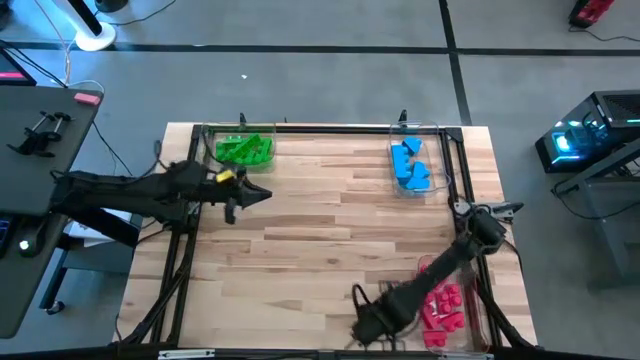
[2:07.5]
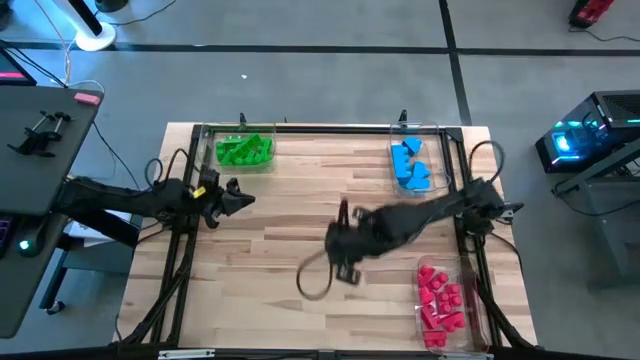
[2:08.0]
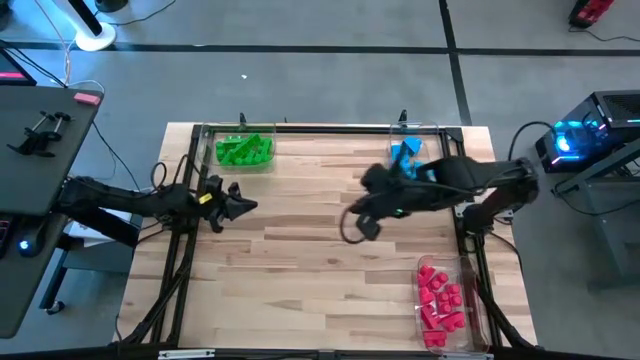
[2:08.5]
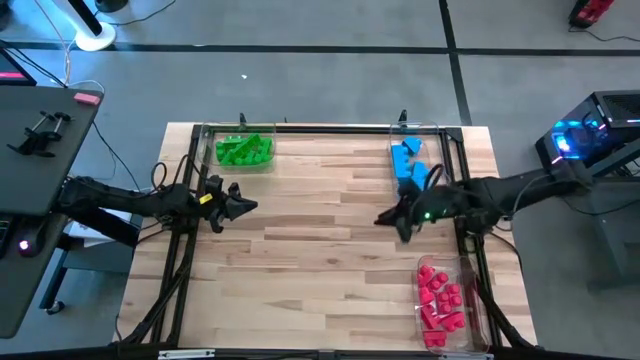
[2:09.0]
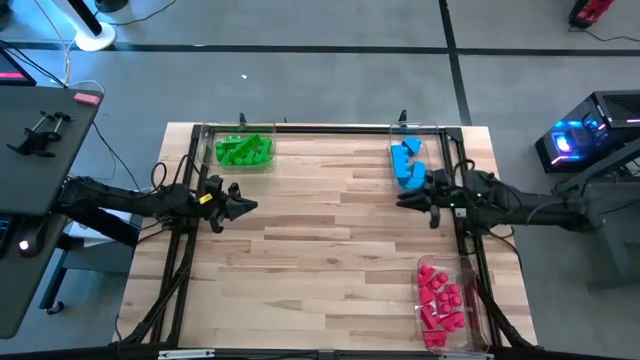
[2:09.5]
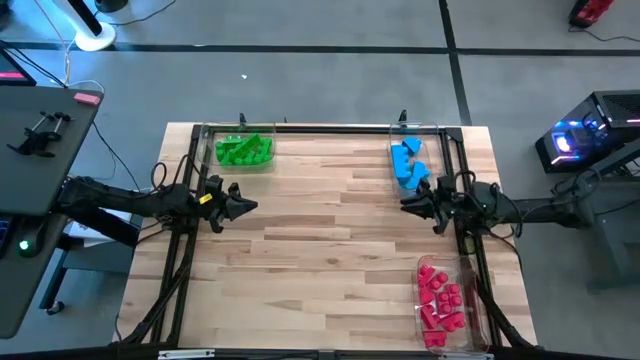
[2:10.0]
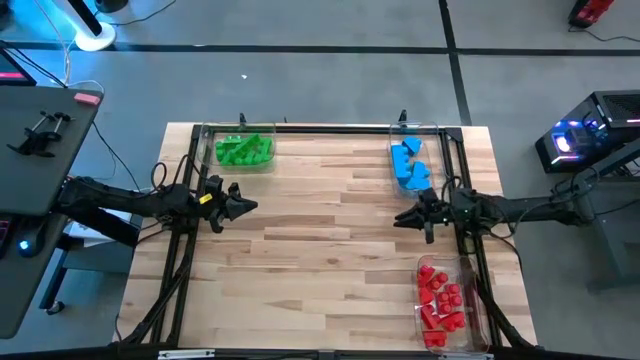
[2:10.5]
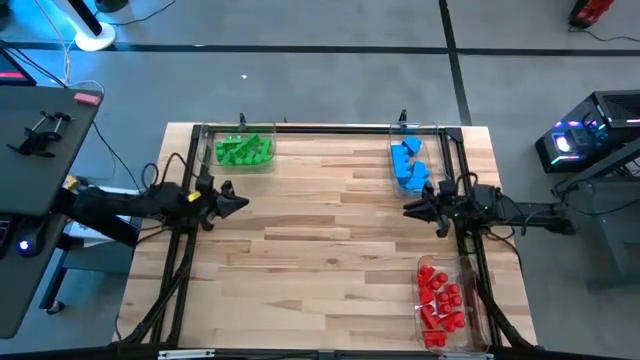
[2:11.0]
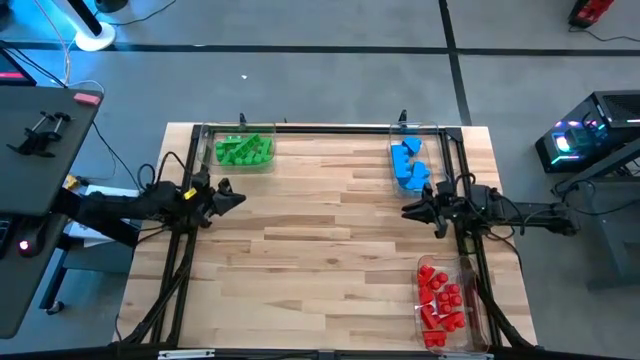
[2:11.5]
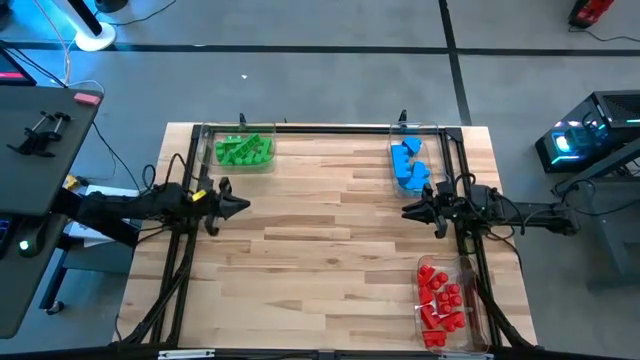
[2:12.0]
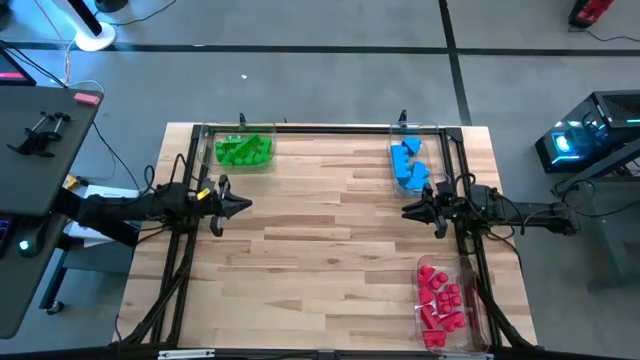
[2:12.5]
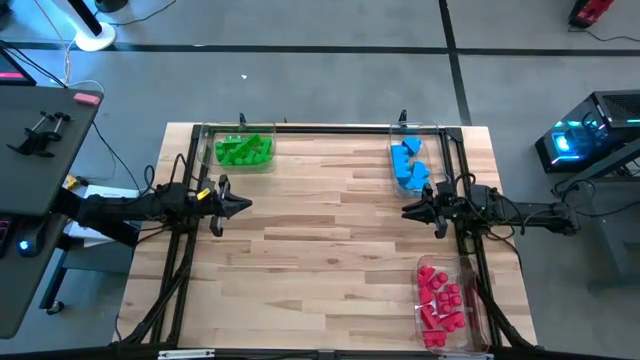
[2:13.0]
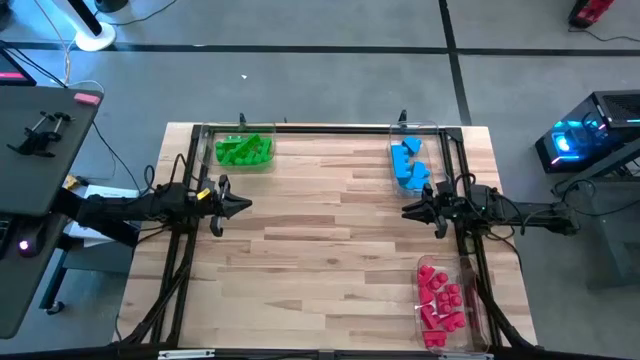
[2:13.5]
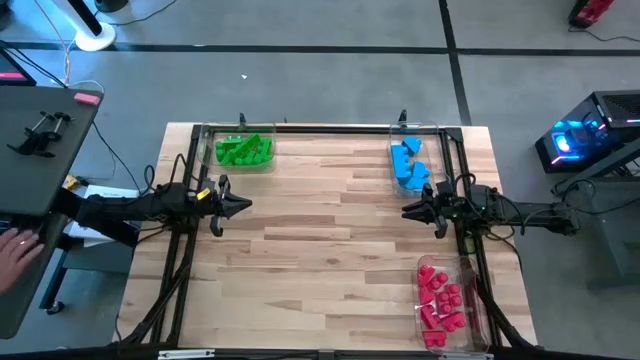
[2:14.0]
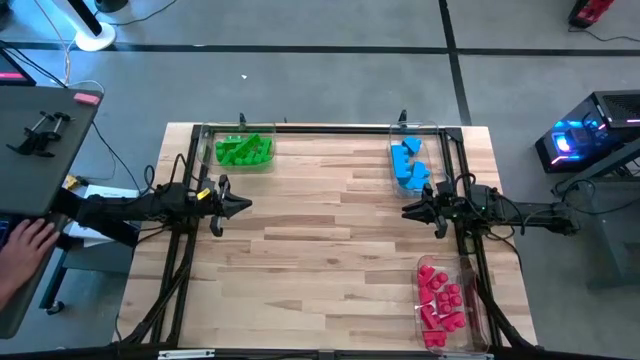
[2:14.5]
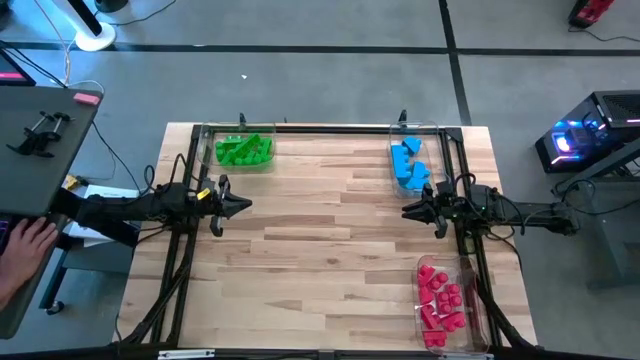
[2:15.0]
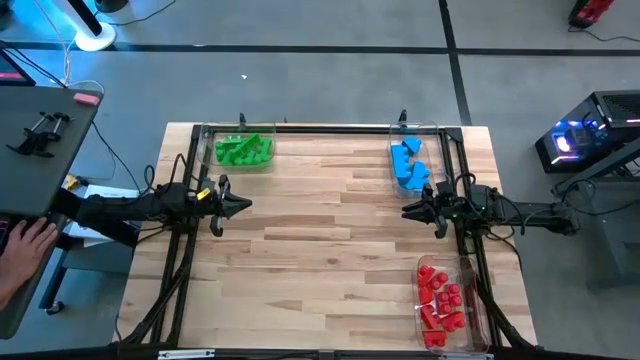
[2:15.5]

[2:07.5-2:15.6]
Task: Sort blocks
Return to Home Position

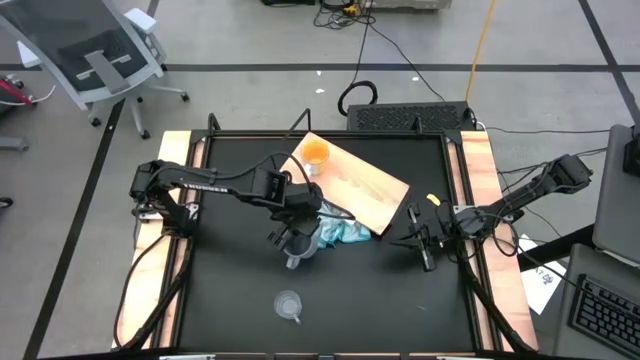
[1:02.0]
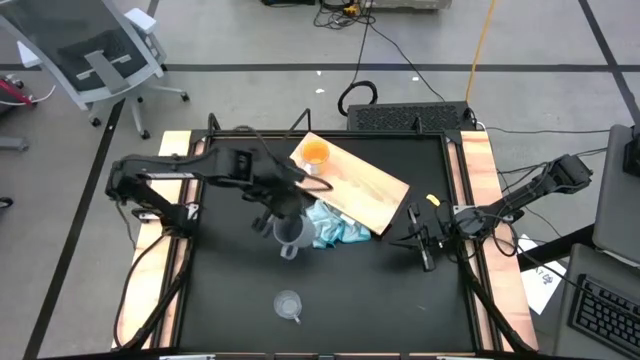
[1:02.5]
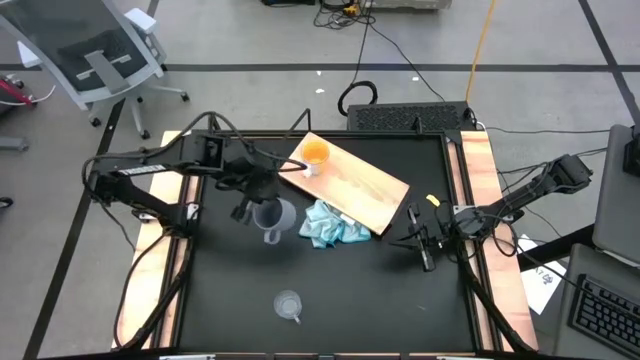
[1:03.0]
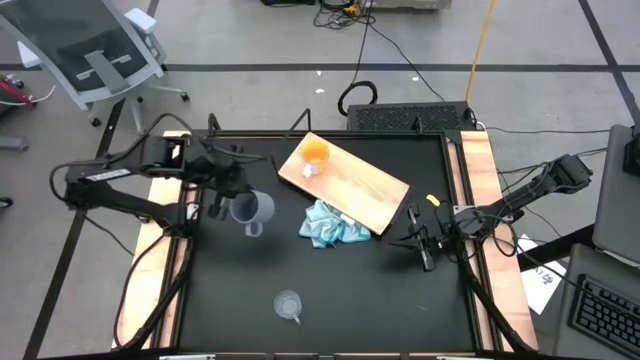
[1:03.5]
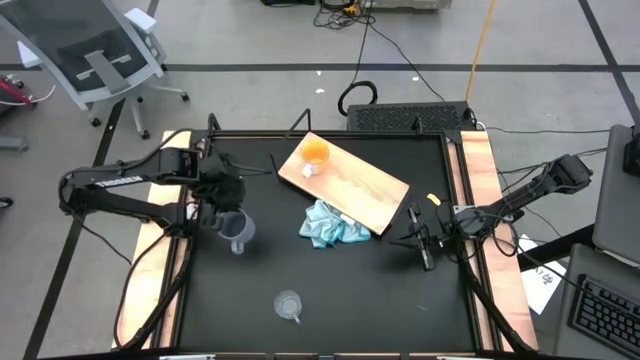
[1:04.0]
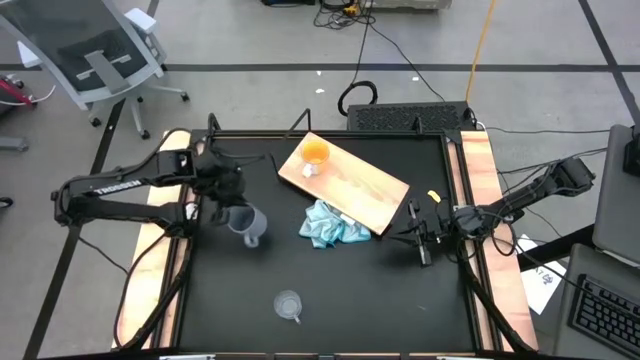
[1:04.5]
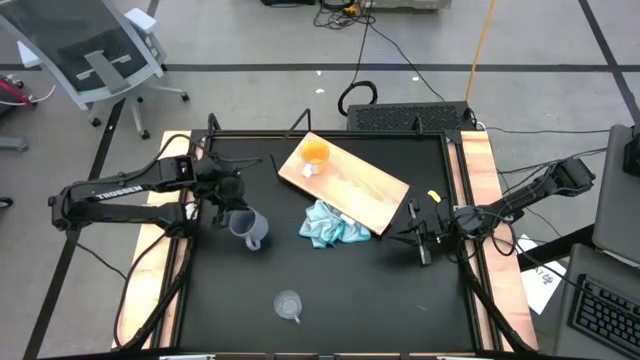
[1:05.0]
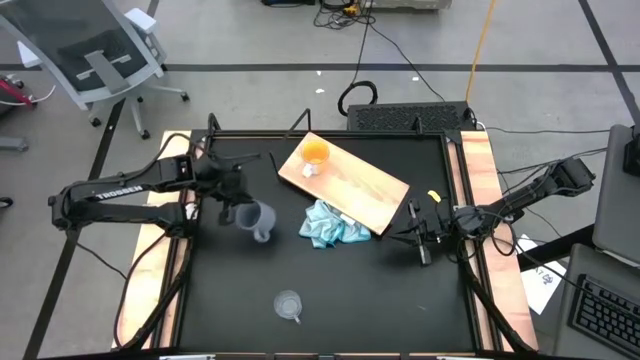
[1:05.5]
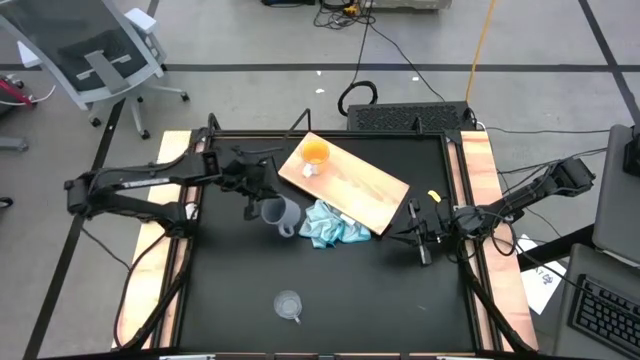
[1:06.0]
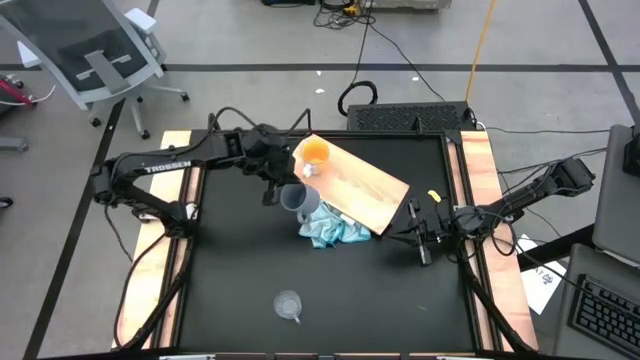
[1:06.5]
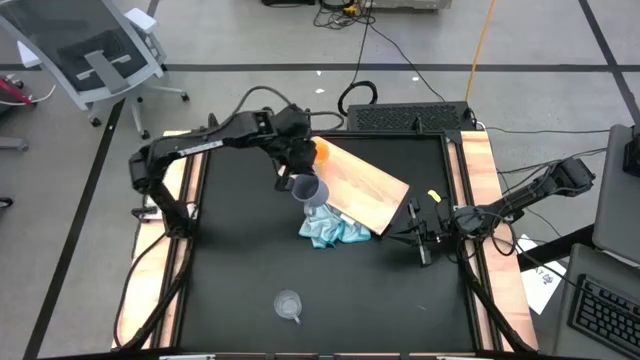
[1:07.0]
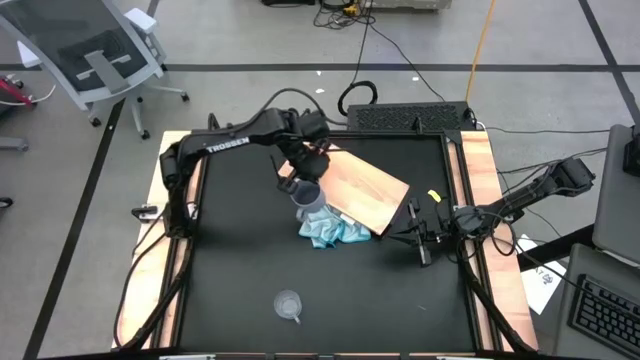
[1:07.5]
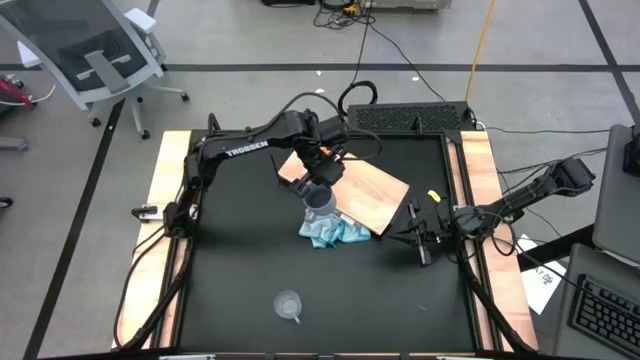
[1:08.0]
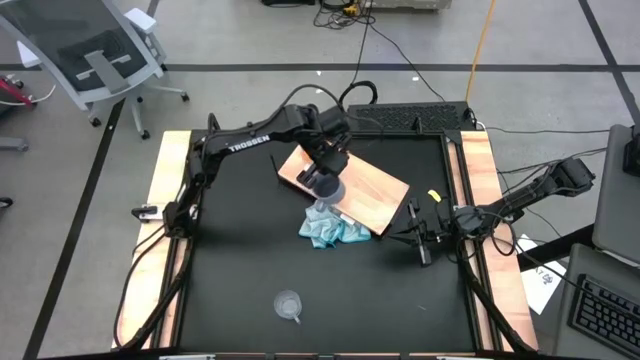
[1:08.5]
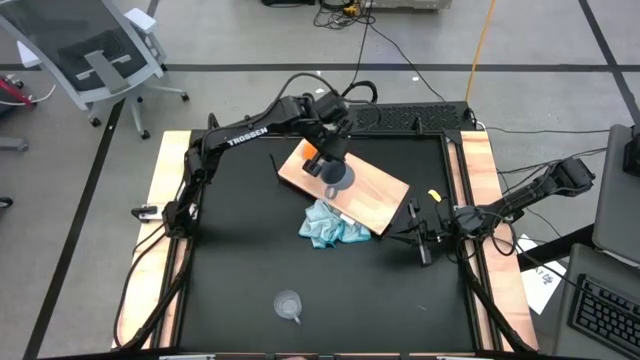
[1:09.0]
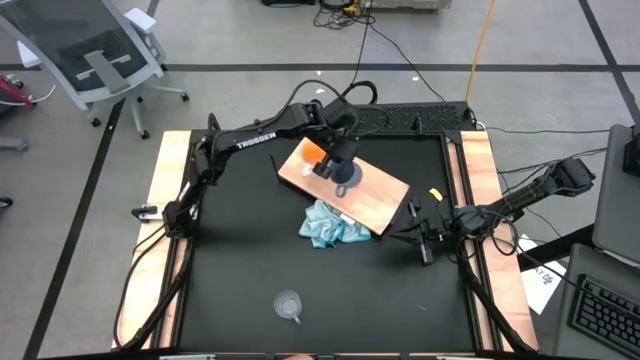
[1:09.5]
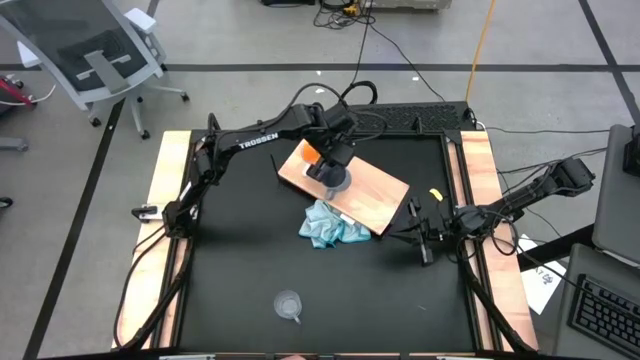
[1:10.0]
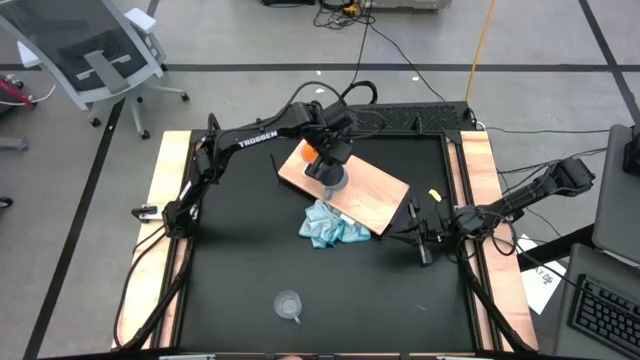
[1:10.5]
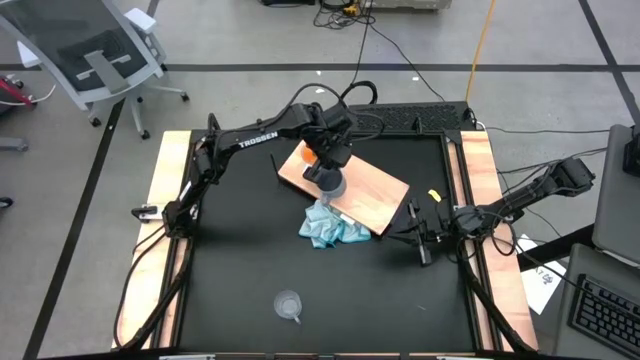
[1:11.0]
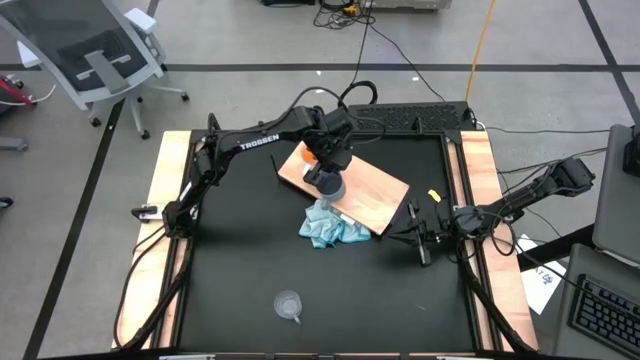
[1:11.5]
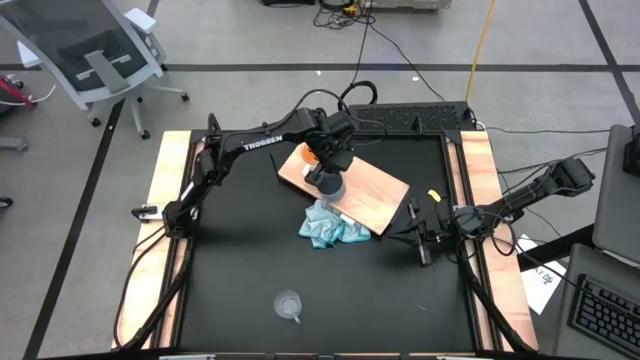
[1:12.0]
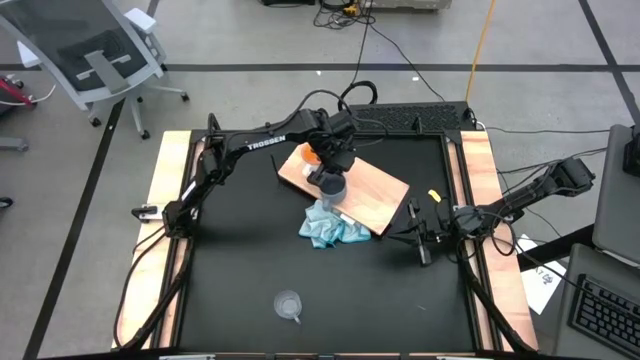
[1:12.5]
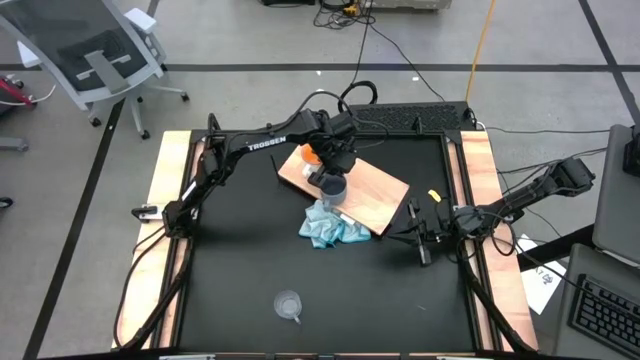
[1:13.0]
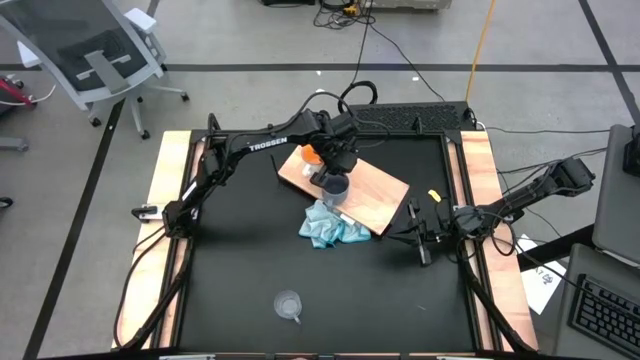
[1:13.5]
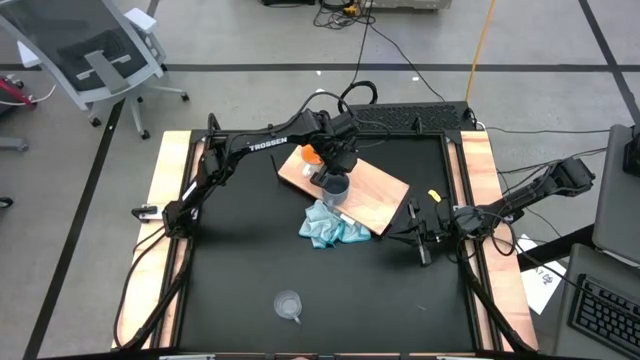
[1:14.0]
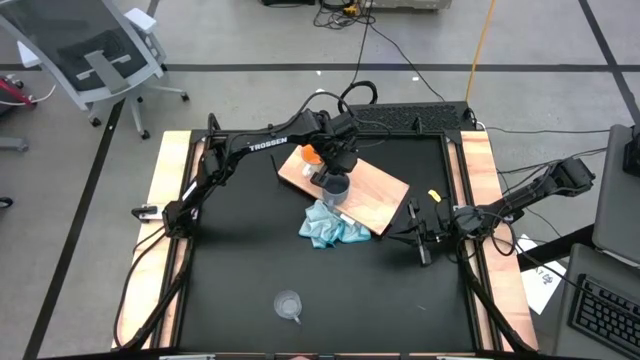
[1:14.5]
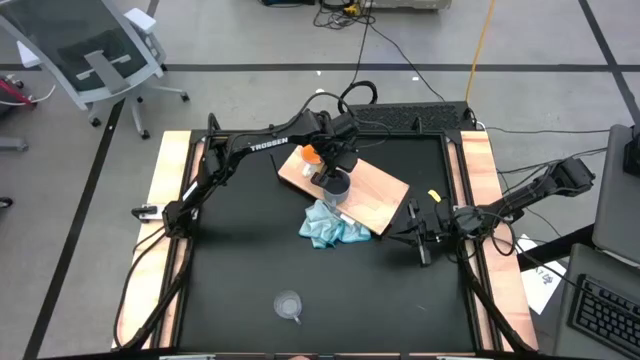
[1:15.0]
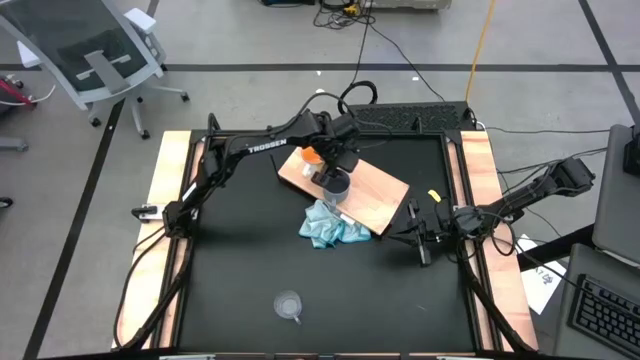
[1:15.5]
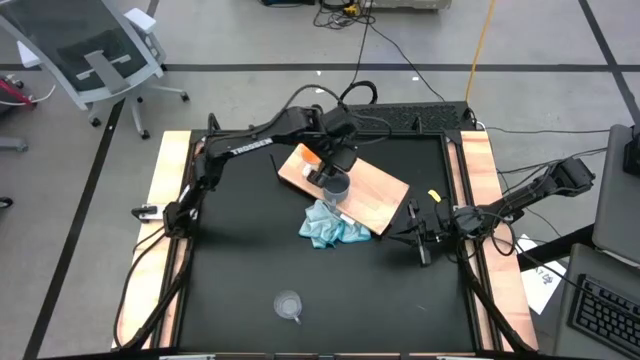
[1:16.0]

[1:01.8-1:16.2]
Task: Stack small to large cups/mugs on shelf
Put the gray mug on the shelf
